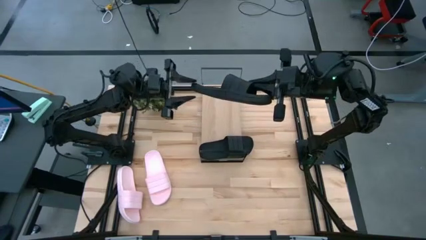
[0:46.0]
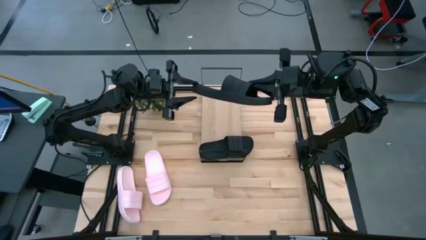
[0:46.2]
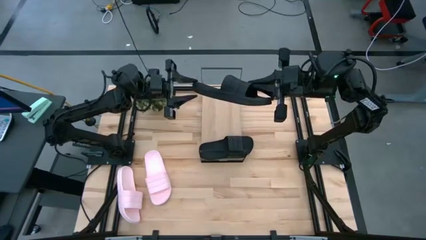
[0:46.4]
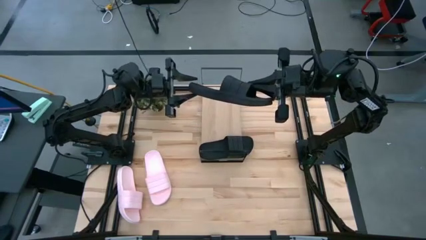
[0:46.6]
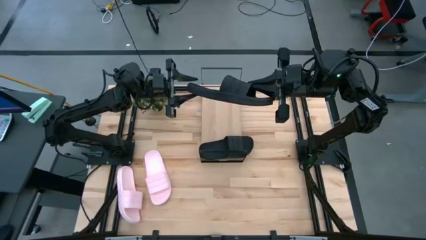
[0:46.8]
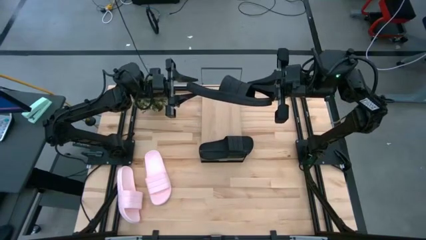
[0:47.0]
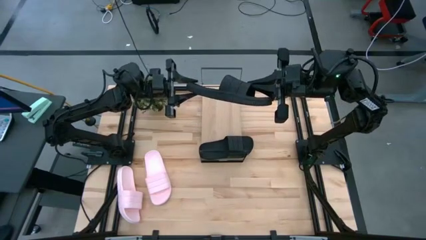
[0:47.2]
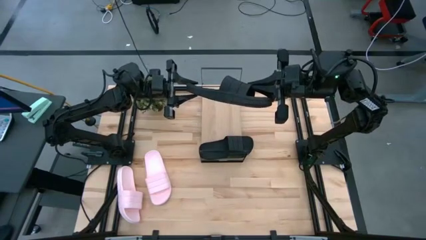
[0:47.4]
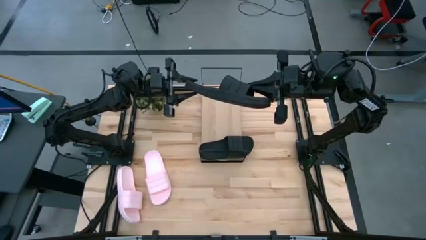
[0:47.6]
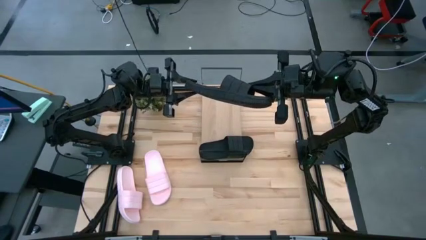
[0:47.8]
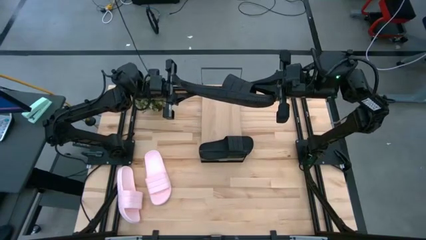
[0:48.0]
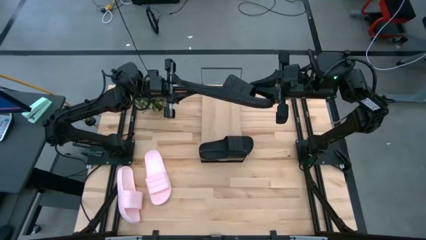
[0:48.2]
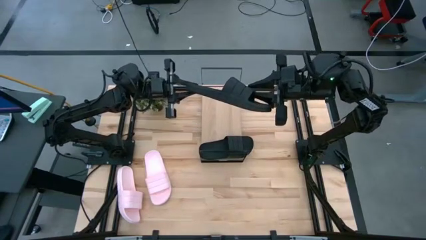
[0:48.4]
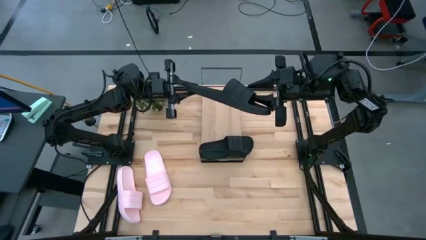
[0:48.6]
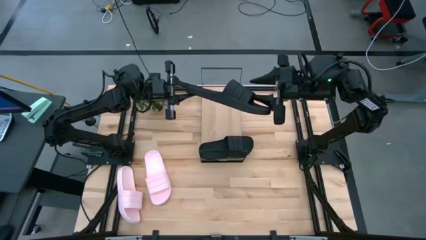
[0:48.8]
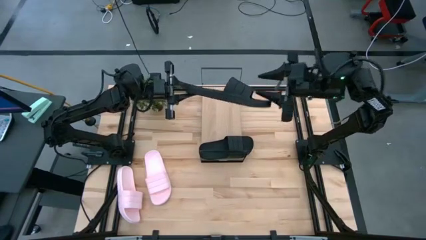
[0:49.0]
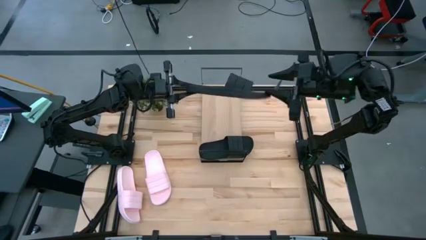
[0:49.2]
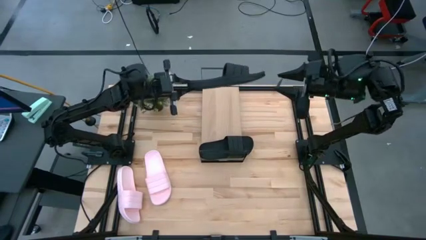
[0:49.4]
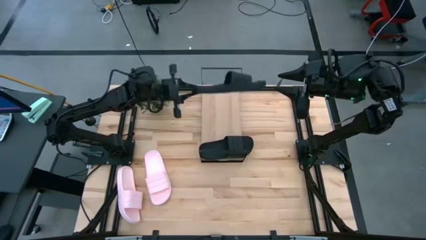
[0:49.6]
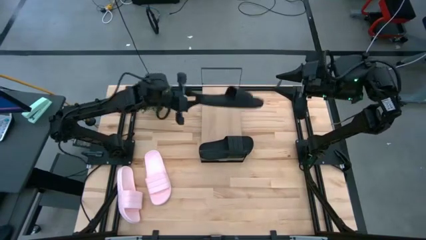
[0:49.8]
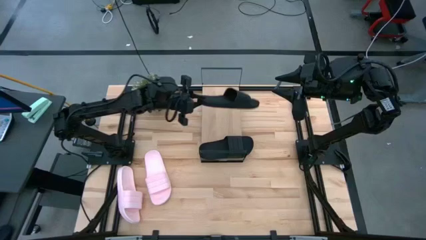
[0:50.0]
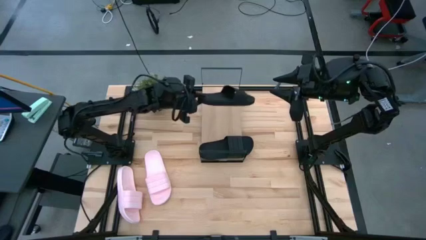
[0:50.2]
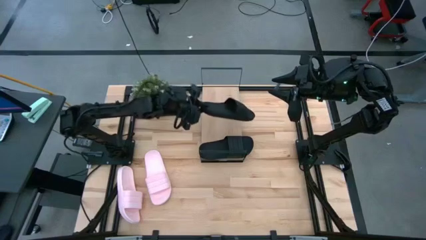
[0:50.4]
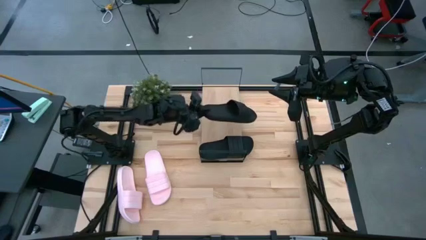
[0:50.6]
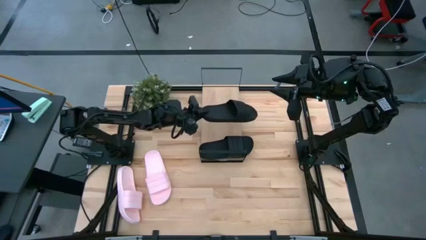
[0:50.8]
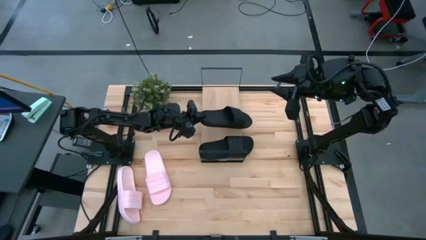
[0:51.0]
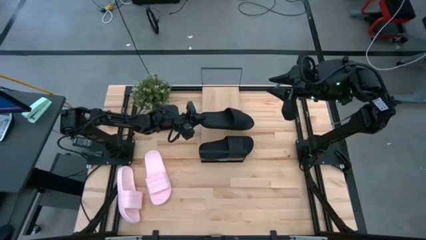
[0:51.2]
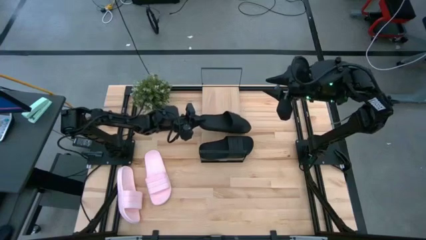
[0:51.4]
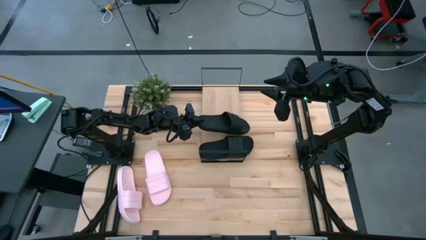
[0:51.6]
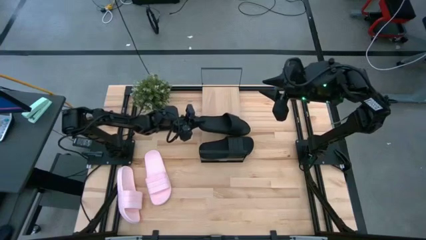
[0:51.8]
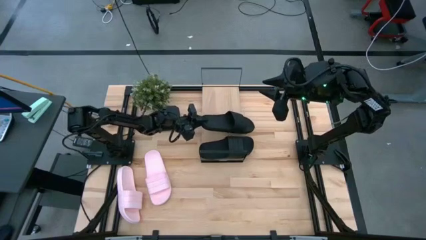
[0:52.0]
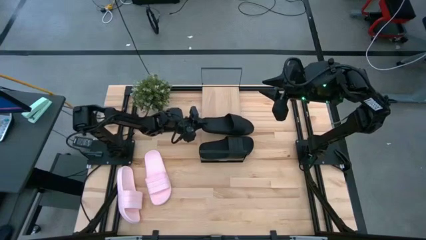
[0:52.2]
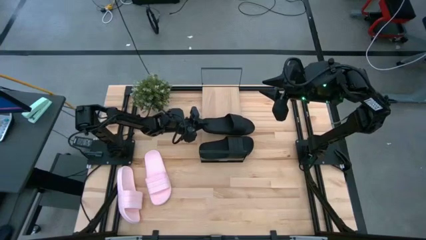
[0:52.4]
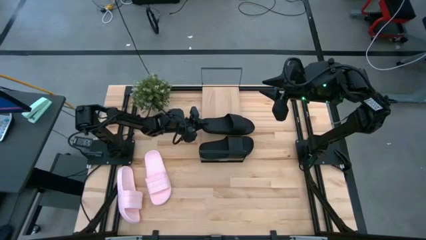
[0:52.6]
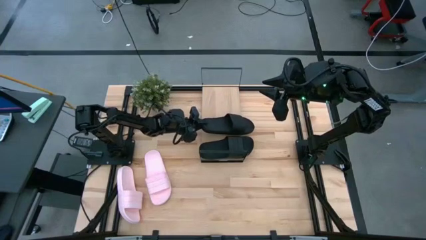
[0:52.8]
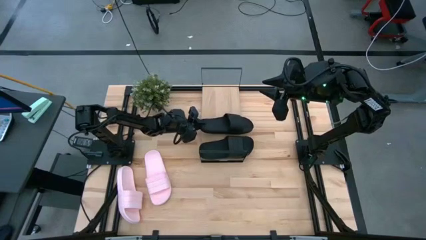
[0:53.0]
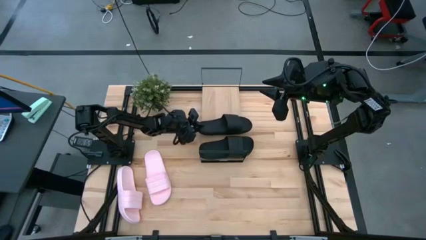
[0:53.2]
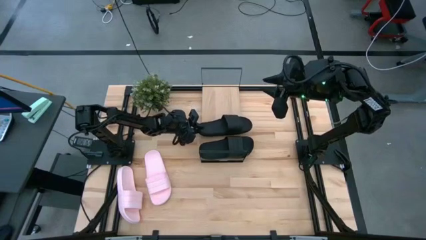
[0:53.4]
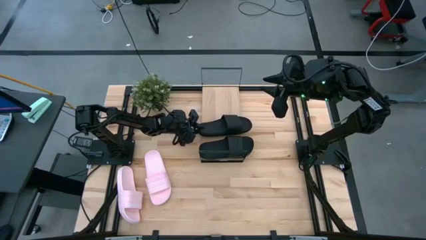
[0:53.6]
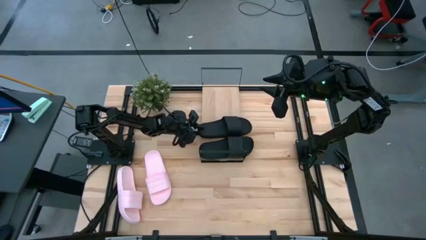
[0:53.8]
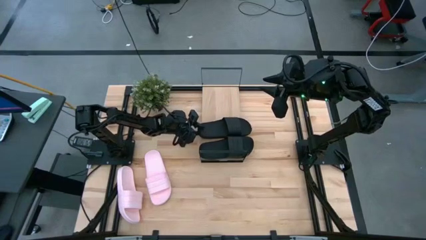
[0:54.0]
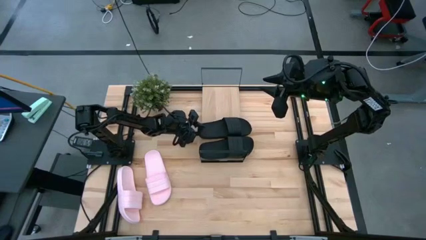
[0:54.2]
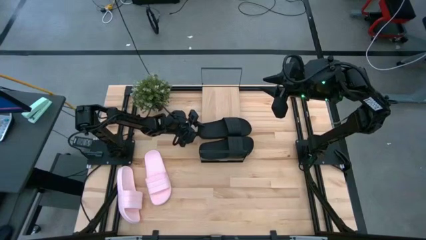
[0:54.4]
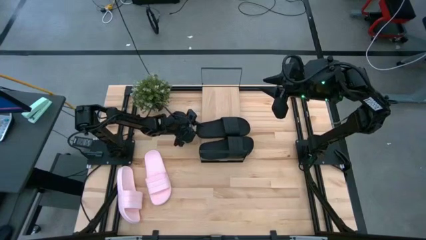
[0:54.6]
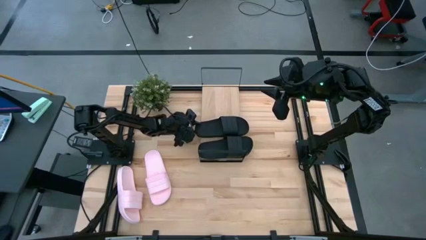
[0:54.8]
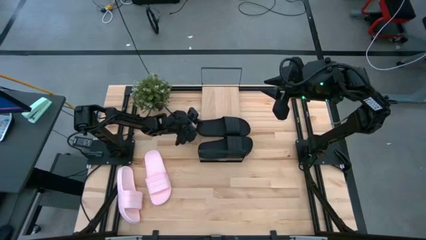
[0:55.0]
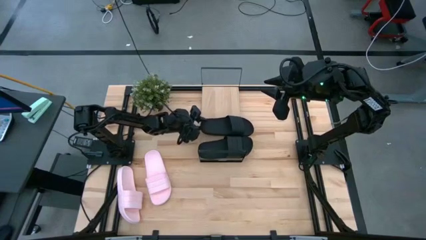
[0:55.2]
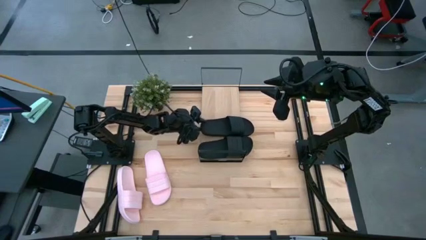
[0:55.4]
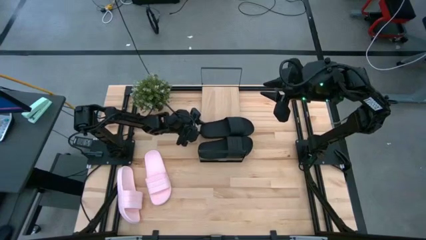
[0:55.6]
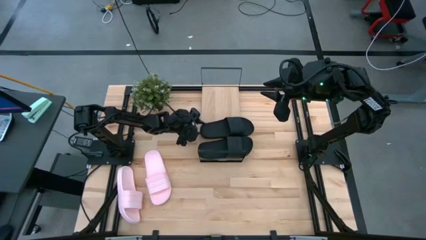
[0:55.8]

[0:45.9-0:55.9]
Task: Pick and place slides into the shelf
Put the black slipper on the shelf

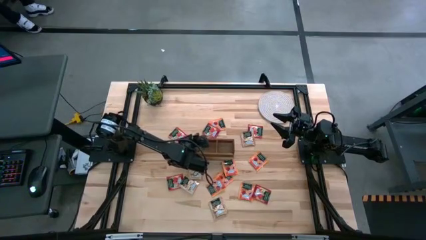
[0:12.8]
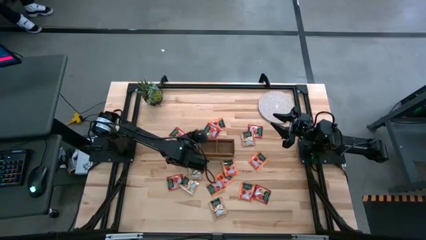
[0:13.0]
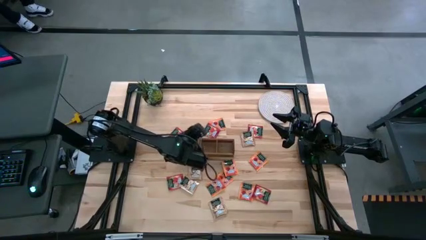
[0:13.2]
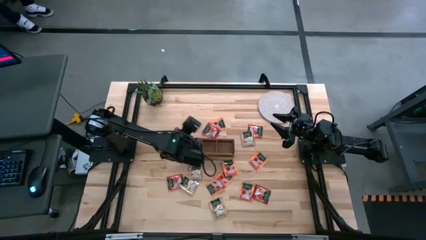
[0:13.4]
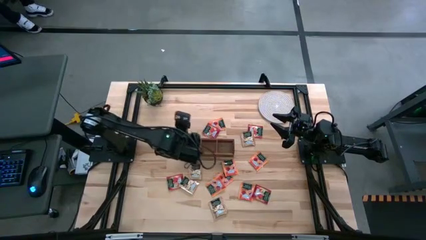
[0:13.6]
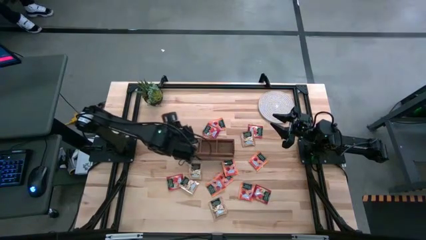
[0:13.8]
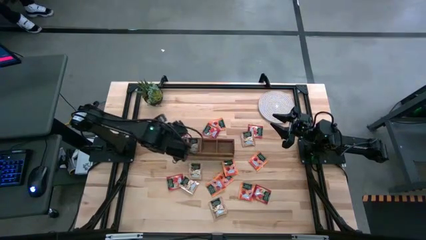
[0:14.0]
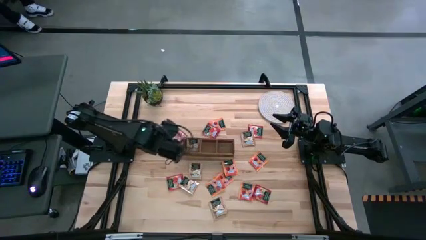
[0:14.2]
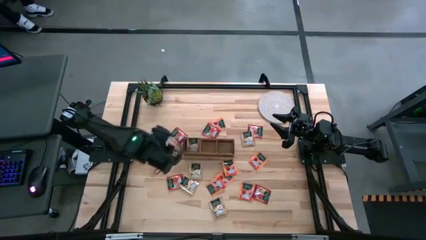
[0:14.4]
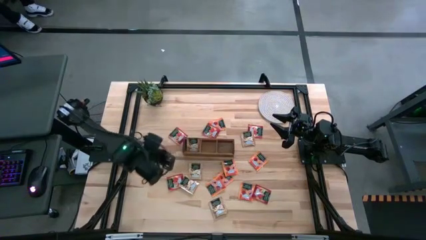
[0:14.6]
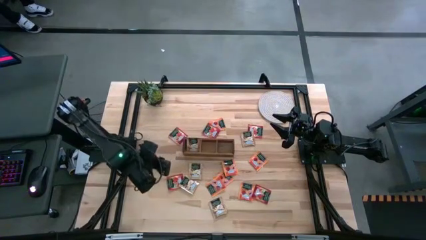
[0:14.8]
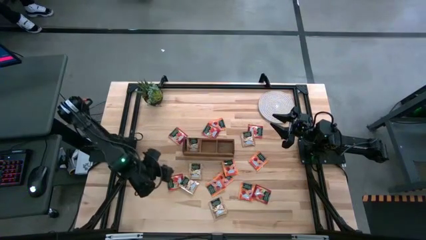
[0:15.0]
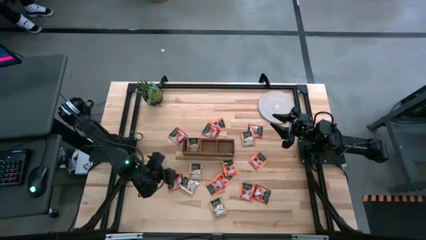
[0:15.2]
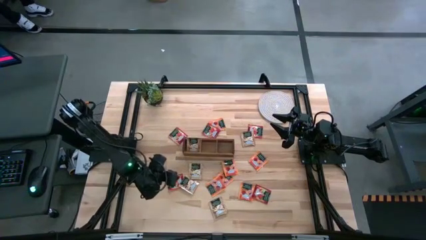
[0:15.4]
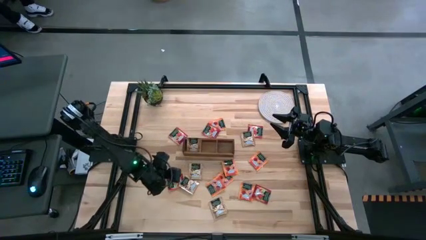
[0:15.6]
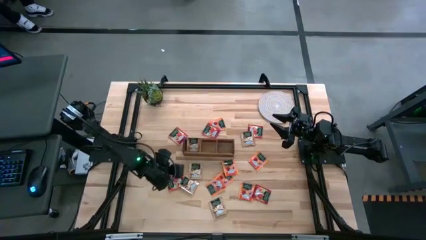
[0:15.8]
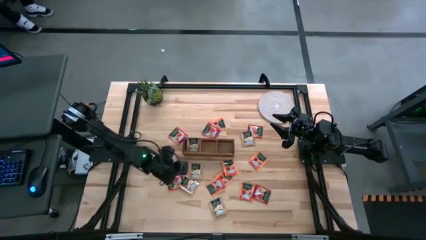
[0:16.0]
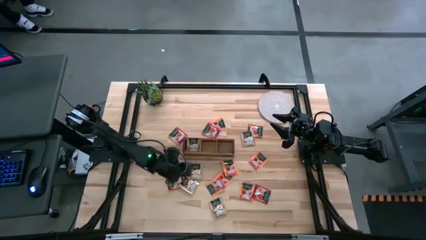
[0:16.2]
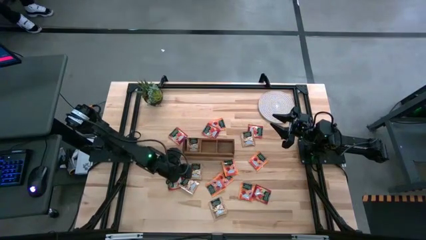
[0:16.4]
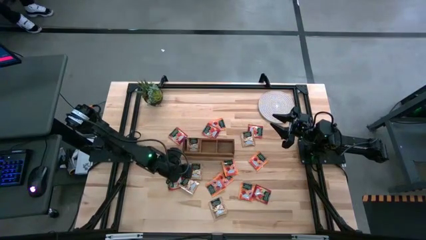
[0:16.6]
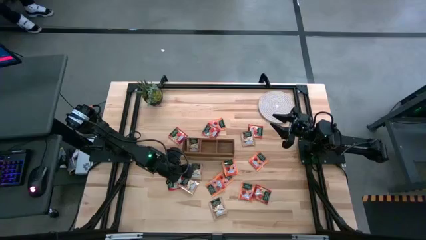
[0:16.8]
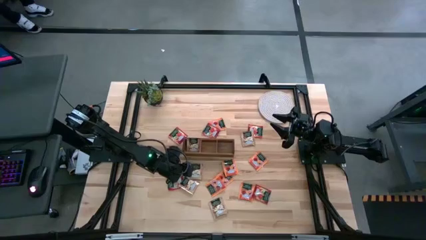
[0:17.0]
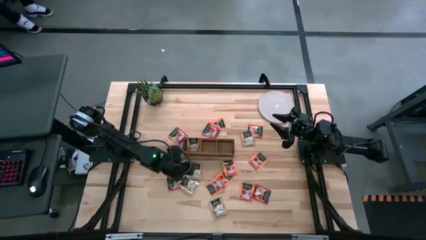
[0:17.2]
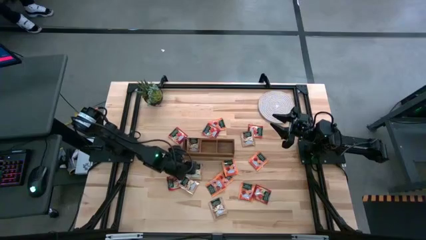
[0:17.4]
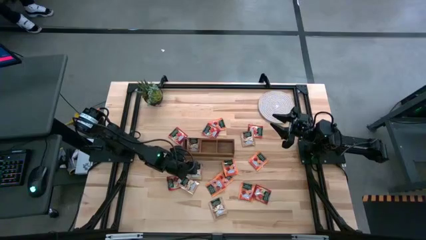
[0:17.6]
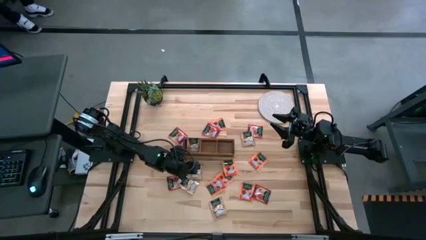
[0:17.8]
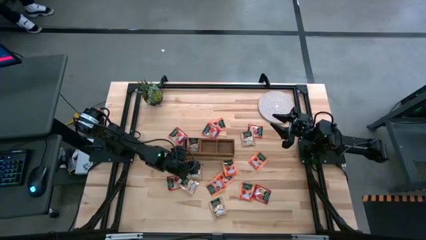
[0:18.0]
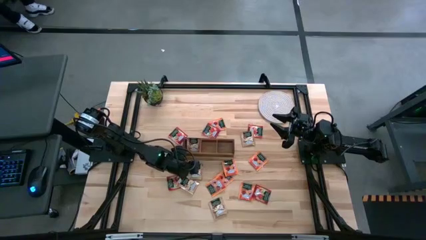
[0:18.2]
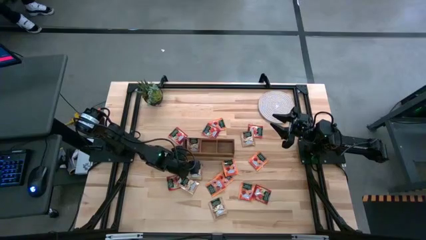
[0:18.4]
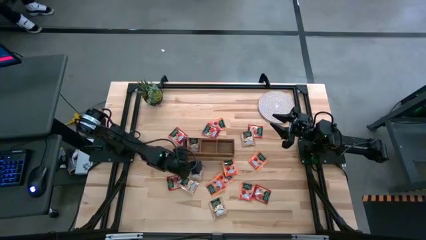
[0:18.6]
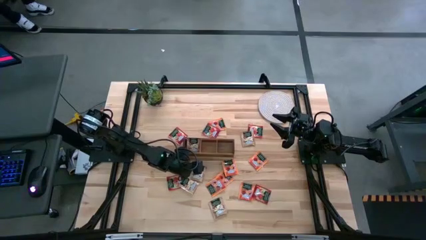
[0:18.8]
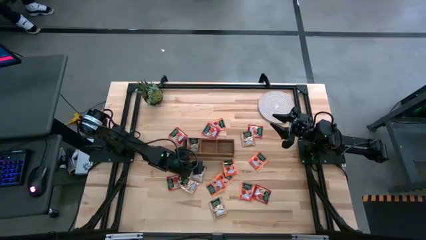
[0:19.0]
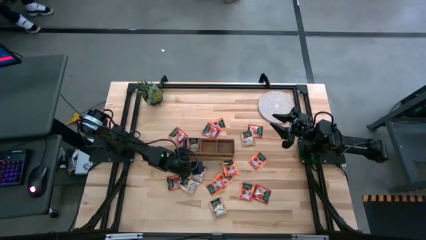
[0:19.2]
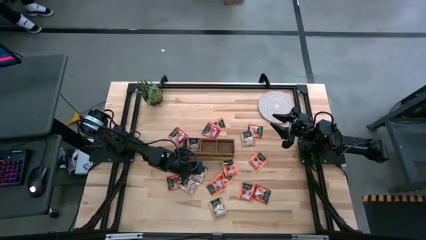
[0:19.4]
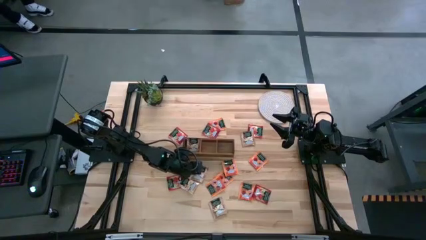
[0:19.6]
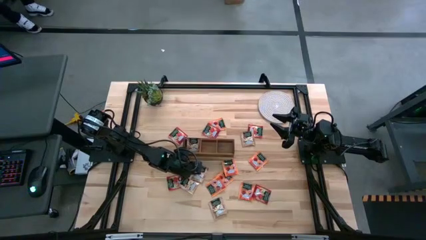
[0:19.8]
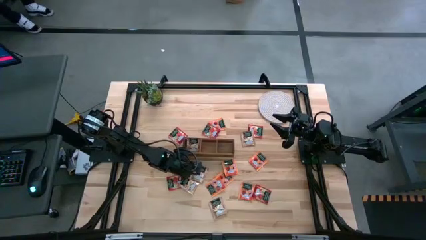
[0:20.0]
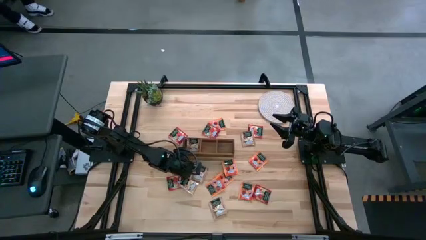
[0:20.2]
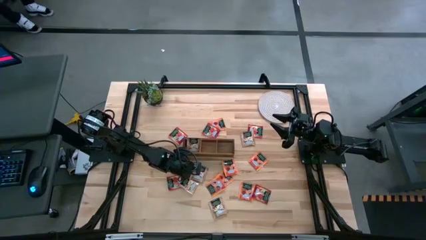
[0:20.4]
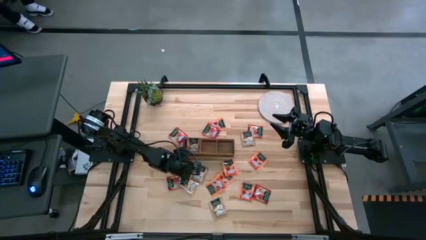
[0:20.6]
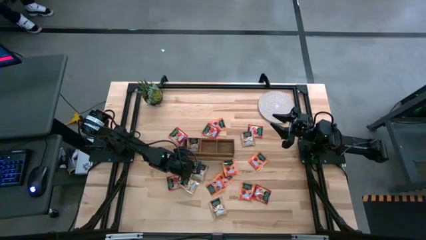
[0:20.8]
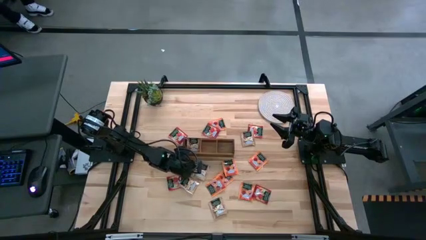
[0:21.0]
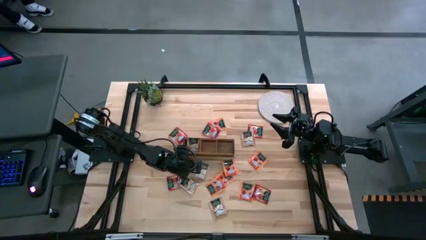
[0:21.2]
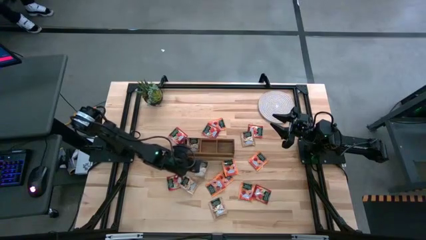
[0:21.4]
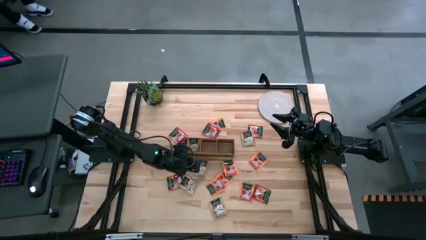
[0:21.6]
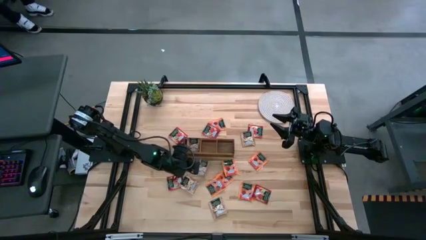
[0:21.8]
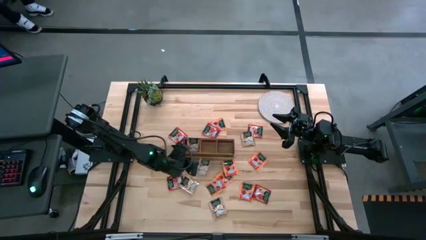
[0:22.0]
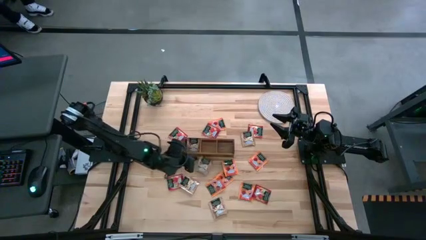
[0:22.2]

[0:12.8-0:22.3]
Task: Pick & Place Tea
Put the brown tea bag into the left section of the brown wooden organizer
